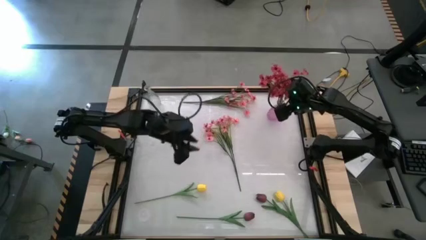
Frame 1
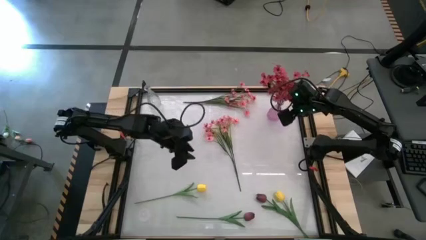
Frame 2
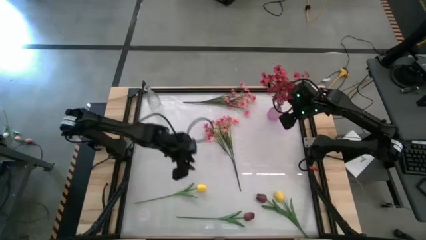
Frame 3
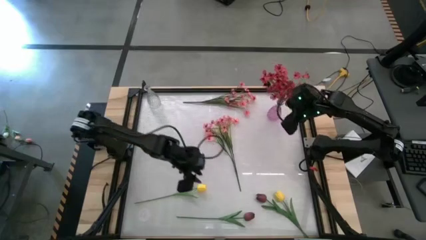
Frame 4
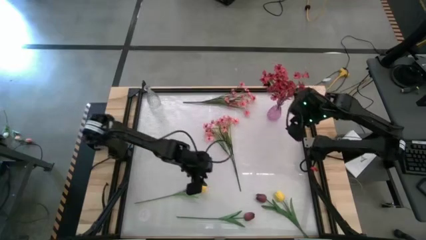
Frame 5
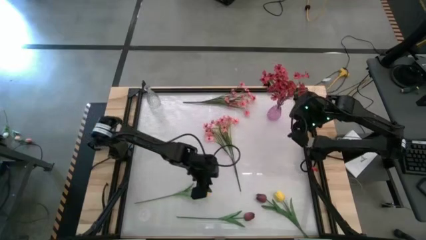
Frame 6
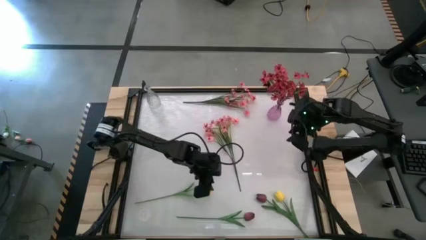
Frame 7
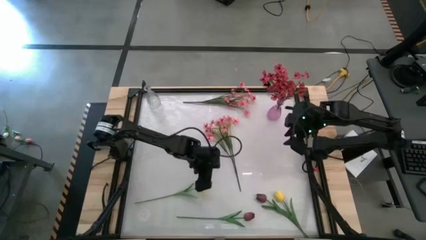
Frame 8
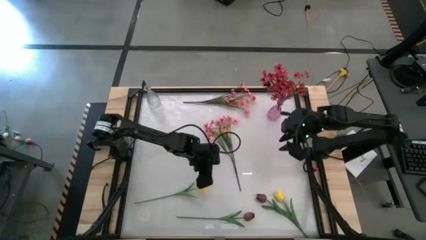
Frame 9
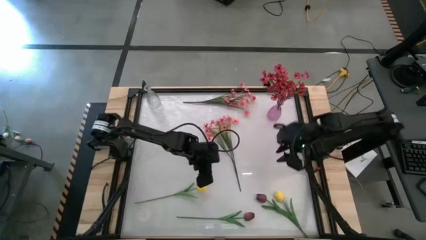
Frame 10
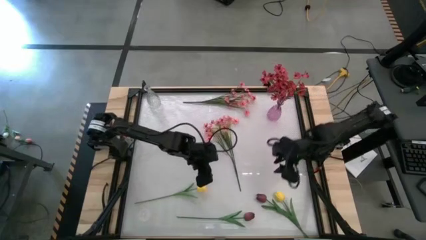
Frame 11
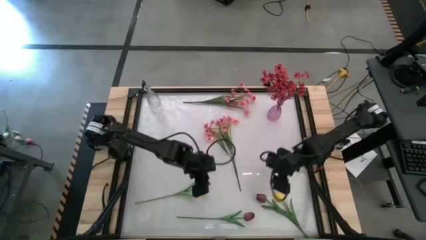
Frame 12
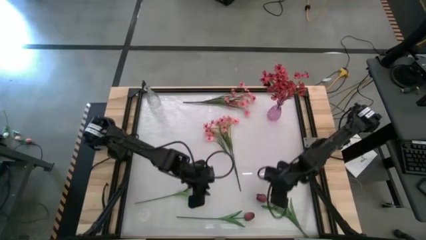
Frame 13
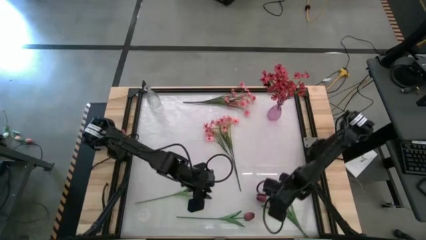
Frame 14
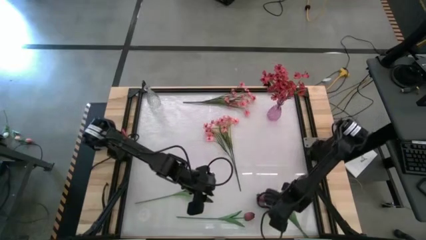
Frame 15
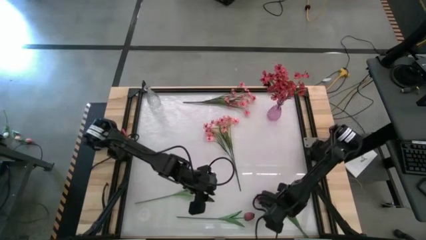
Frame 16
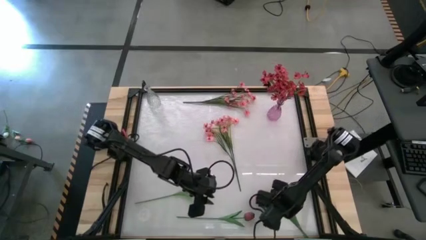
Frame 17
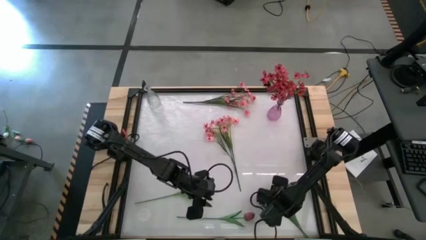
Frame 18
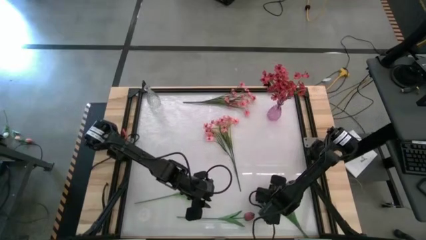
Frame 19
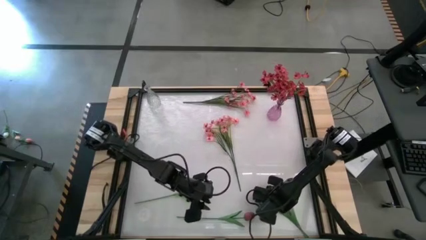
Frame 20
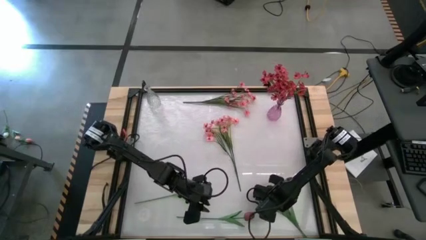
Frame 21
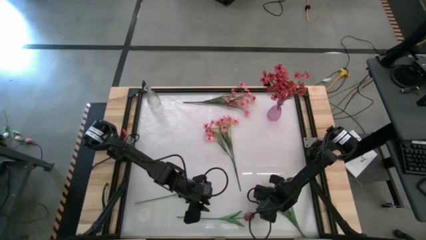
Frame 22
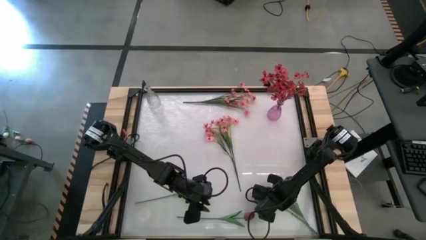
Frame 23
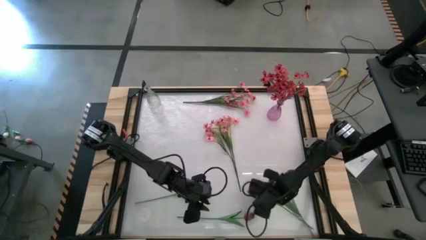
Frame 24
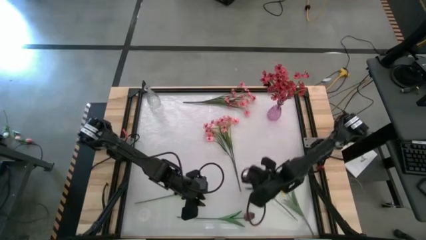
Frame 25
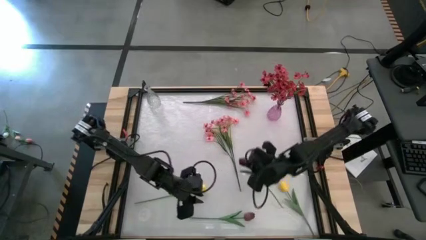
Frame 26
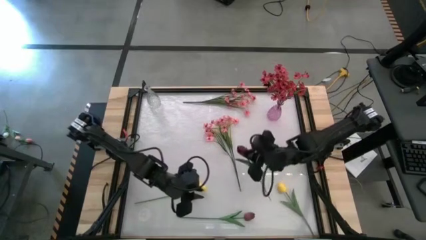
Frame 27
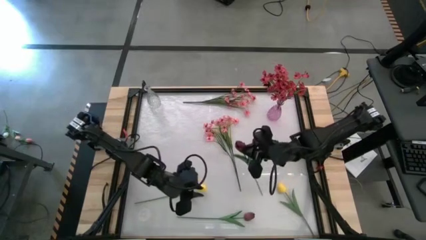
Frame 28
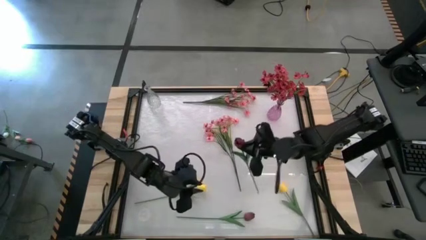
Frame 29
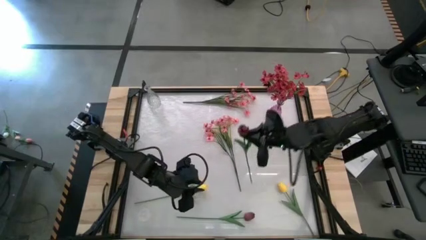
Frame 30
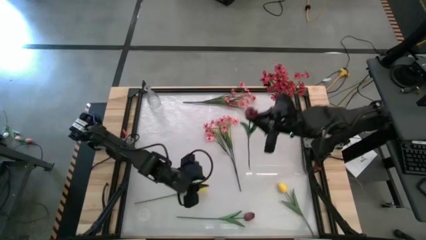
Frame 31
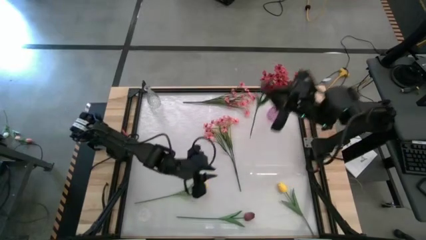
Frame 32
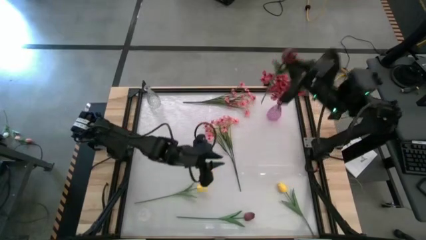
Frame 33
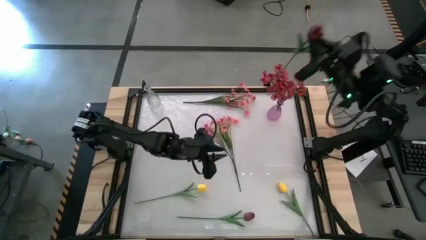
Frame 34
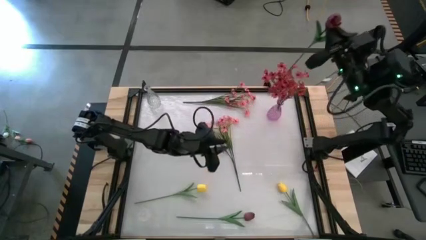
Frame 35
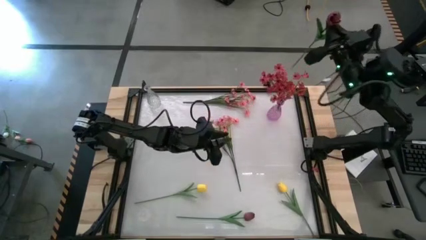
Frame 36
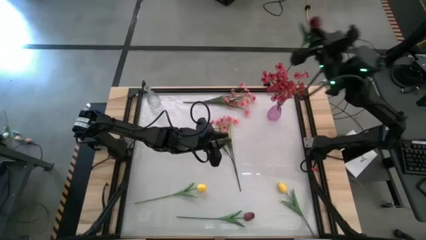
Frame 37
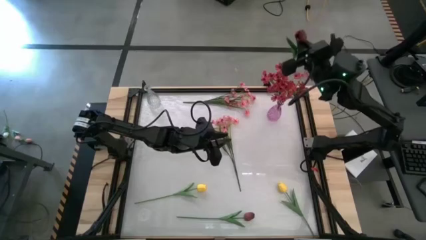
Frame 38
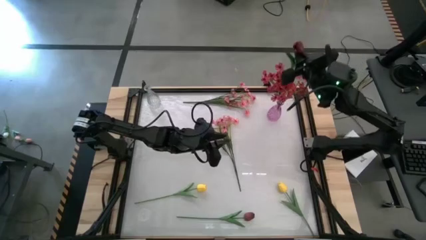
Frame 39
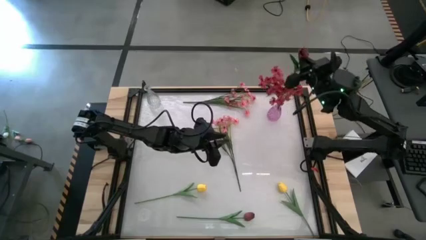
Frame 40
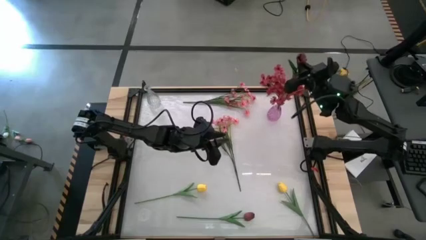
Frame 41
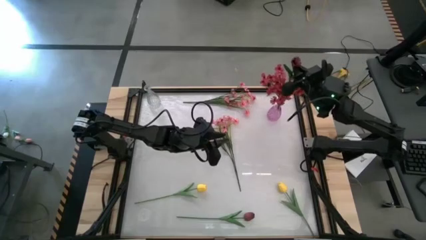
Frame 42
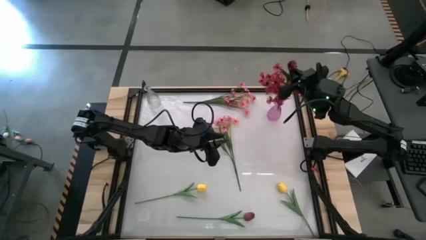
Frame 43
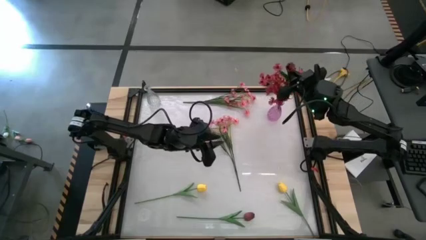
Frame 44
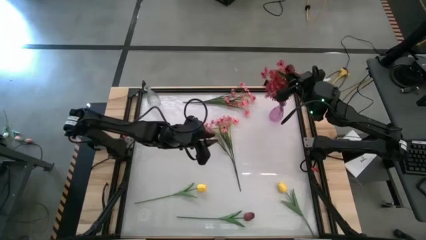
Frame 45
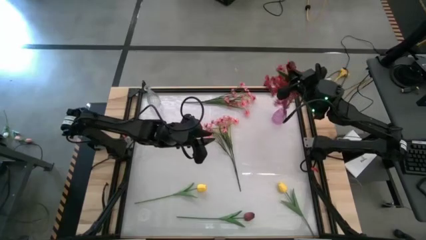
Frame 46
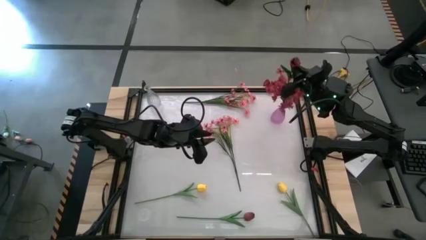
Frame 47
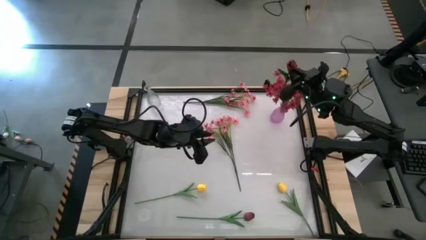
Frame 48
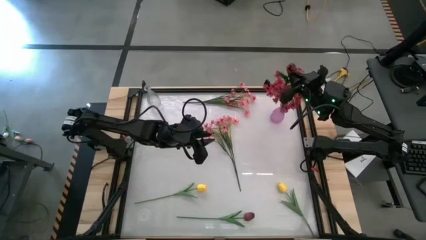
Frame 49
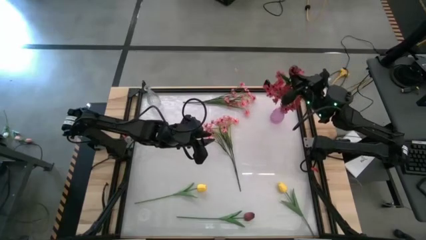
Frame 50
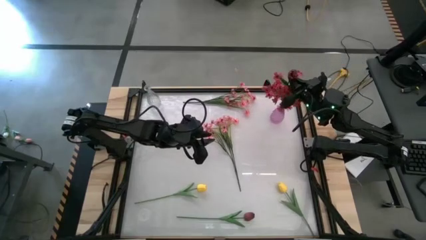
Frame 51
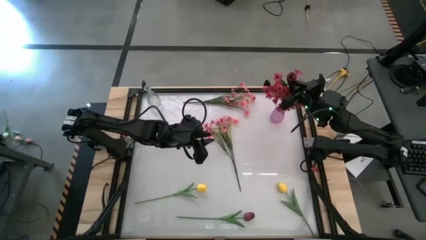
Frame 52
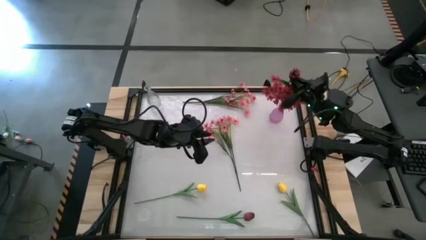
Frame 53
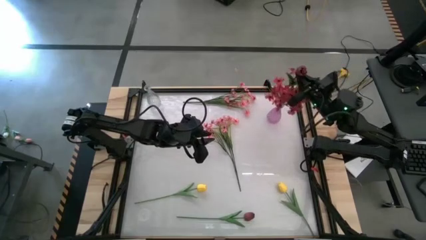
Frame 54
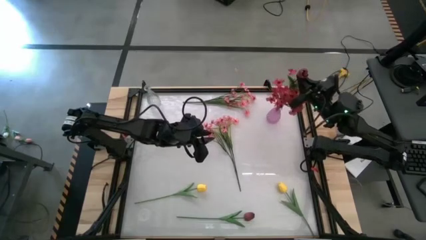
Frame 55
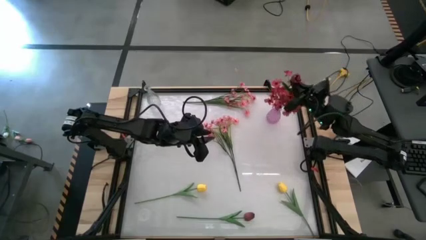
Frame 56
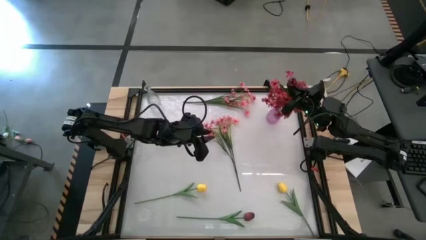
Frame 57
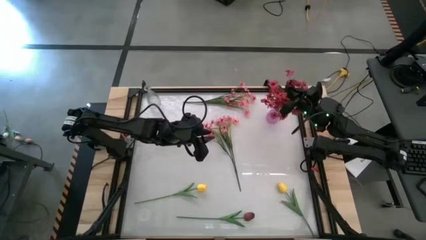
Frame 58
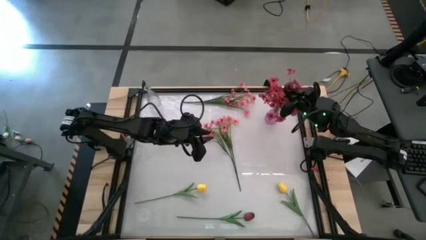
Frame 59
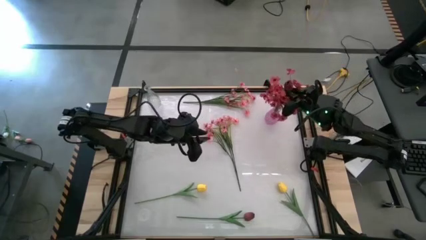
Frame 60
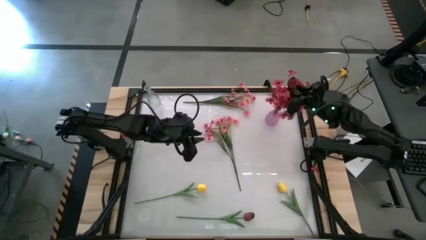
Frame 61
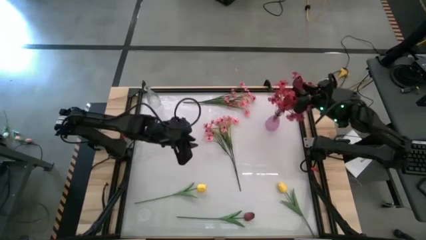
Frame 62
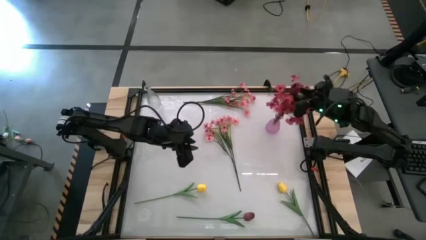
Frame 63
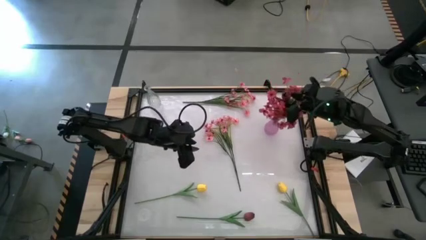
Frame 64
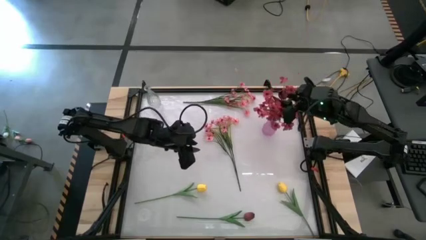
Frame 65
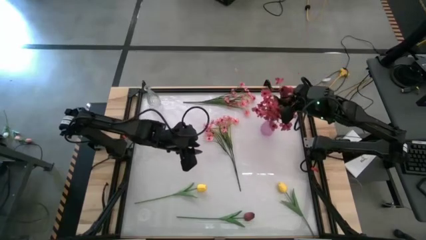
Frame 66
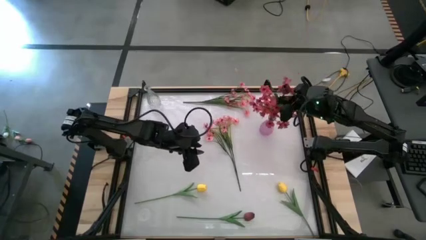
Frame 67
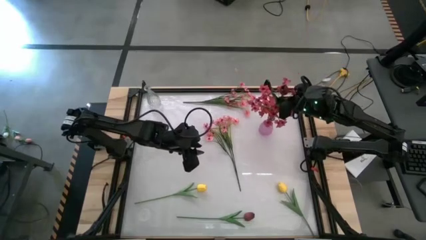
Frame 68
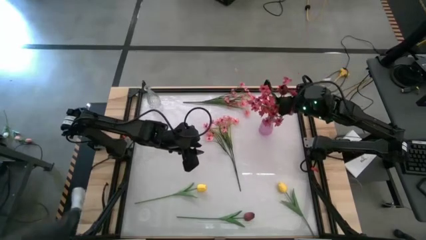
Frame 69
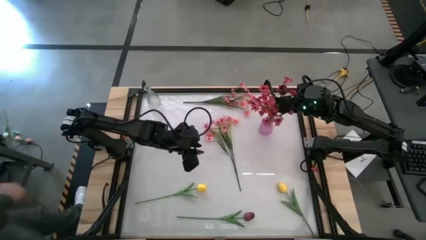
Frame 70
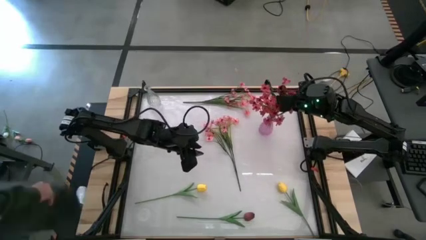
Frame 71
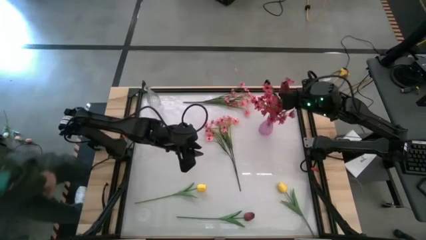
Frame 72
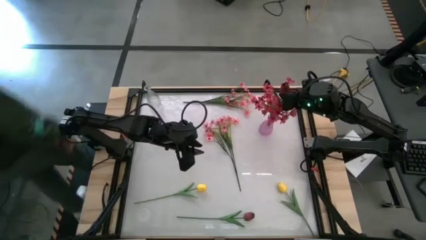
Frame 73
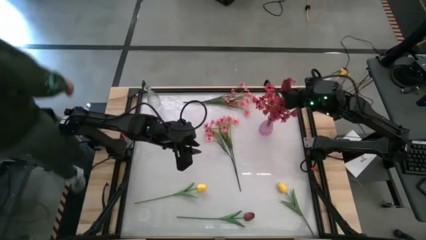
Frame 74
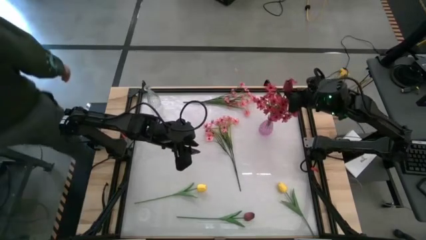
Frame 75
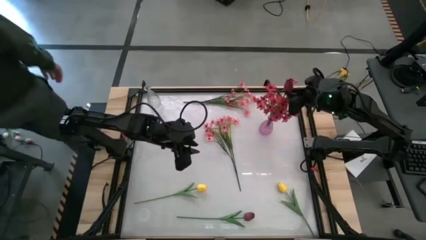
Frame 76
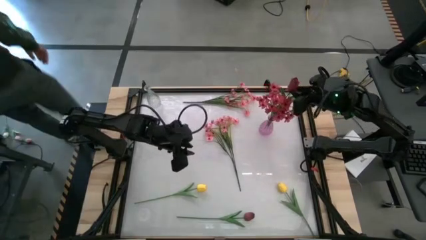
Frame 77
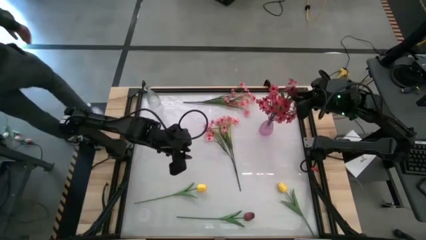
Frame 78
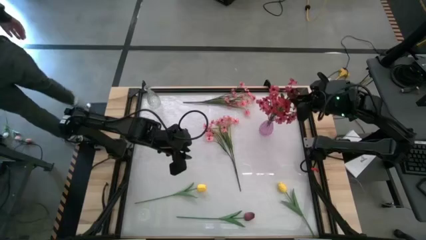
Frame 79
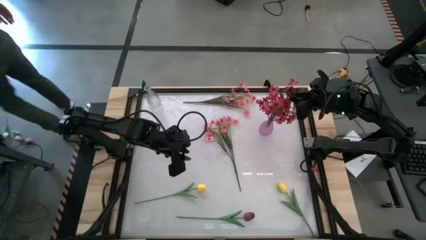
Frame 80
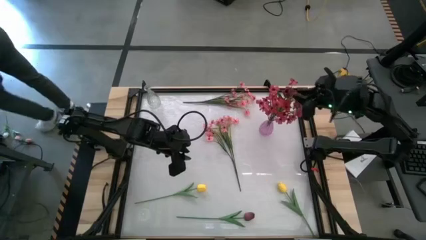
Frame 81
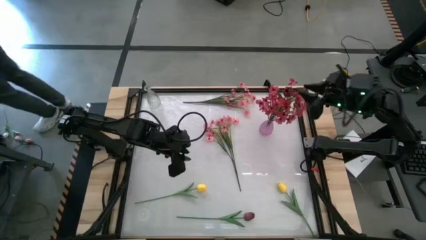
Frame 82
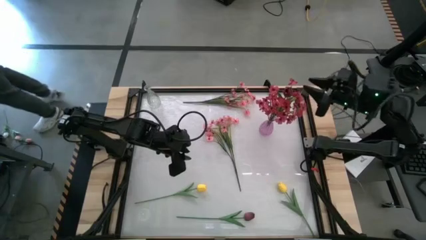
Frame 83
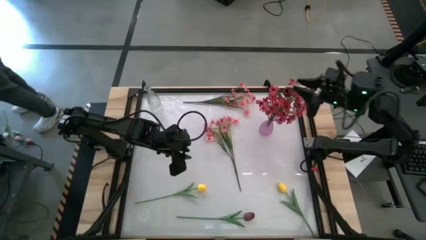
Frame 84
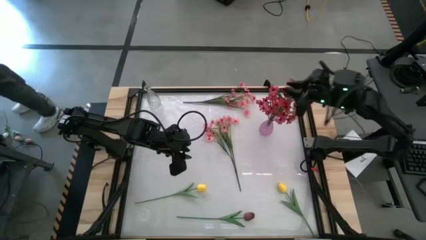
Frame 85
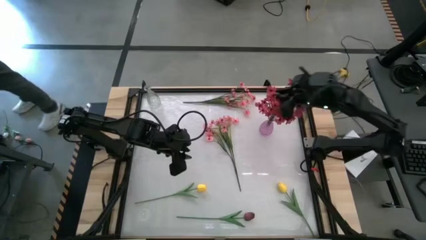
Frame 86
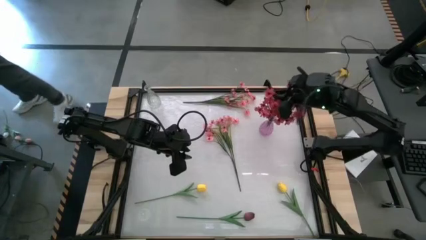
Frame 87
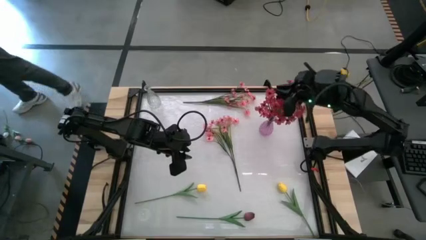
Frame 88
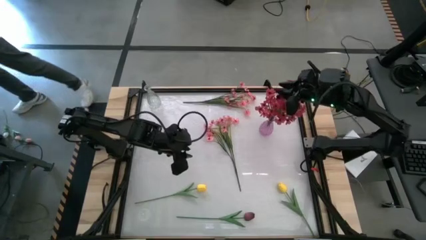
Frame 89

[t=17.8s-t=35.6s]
Task: Sort flowers into vase by color
Put the right red tulip into the pink vase
